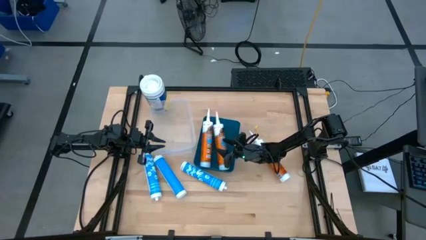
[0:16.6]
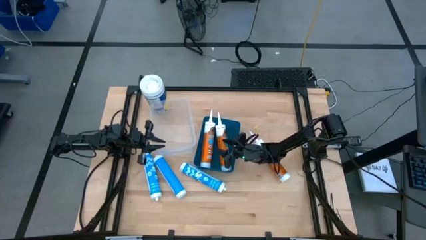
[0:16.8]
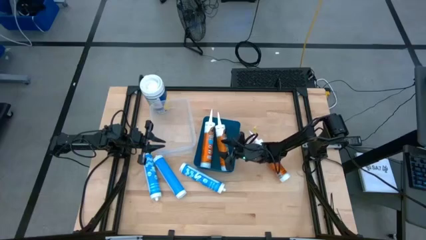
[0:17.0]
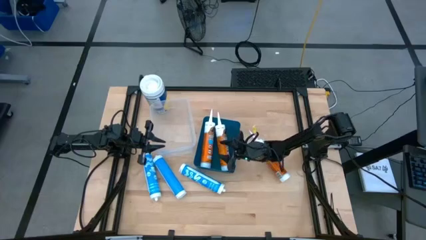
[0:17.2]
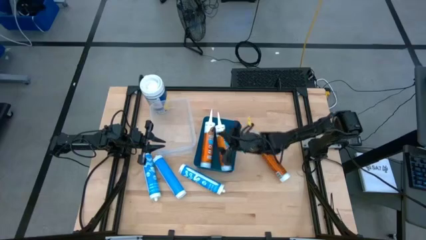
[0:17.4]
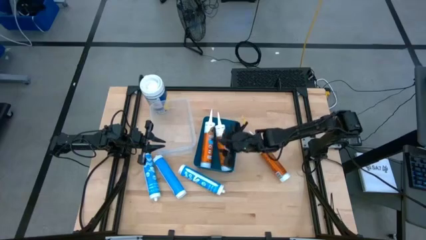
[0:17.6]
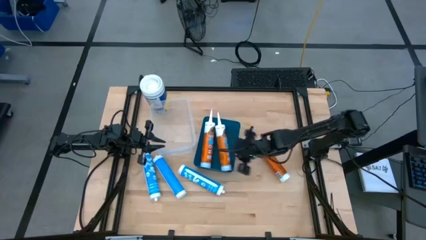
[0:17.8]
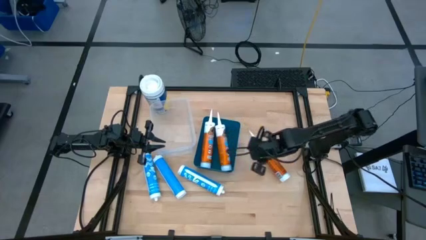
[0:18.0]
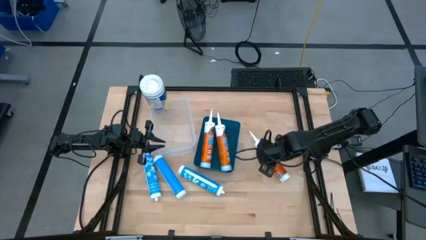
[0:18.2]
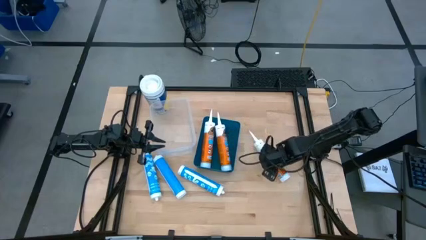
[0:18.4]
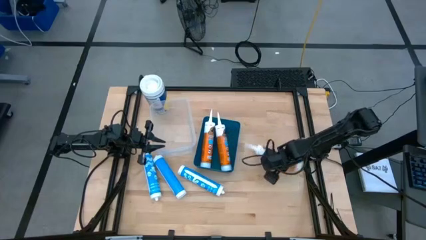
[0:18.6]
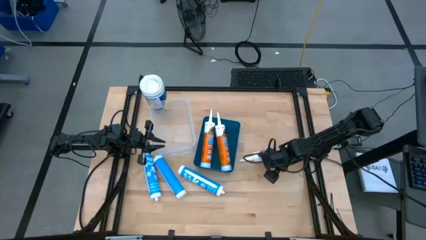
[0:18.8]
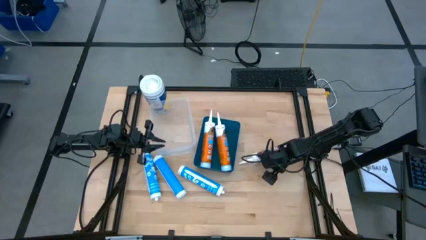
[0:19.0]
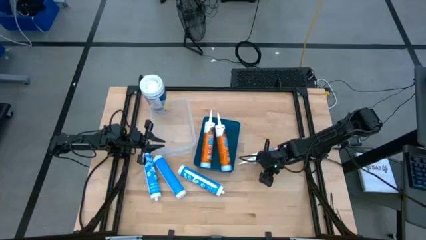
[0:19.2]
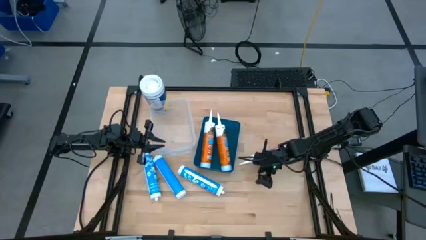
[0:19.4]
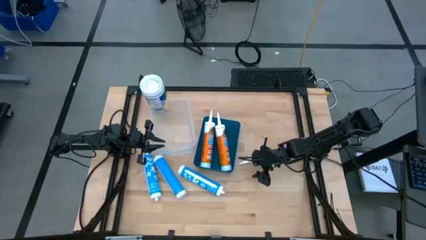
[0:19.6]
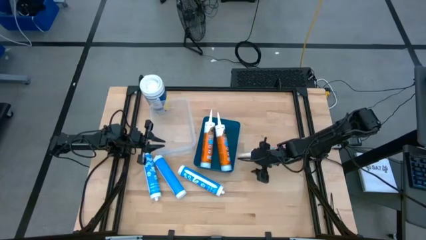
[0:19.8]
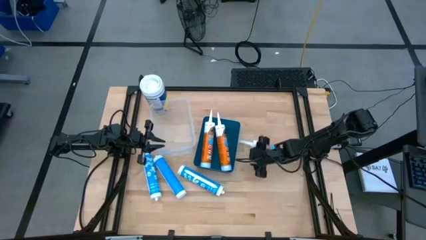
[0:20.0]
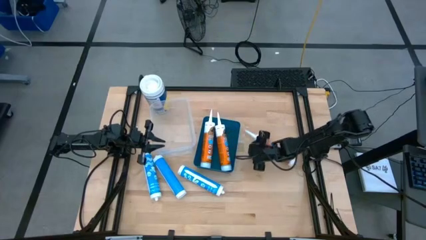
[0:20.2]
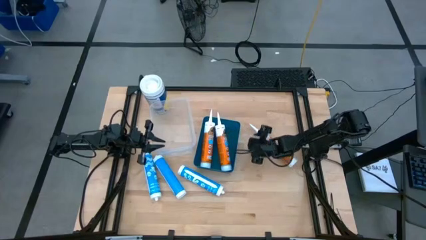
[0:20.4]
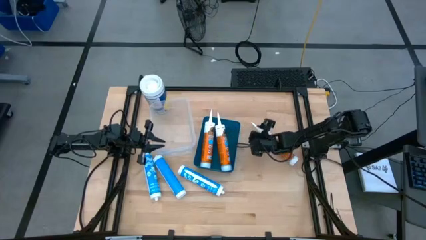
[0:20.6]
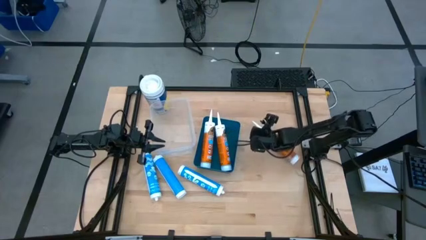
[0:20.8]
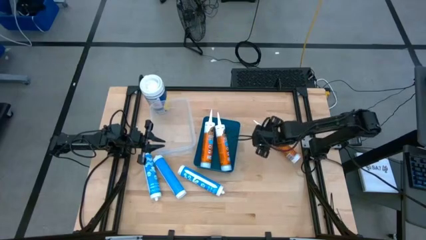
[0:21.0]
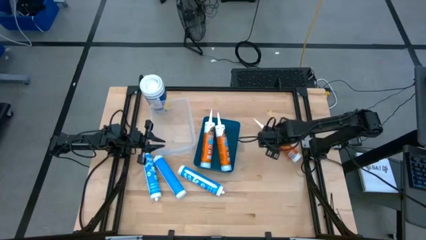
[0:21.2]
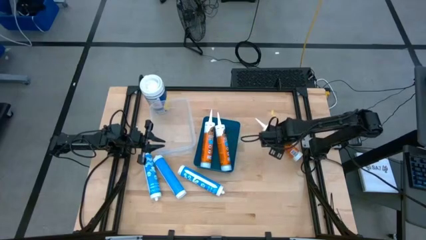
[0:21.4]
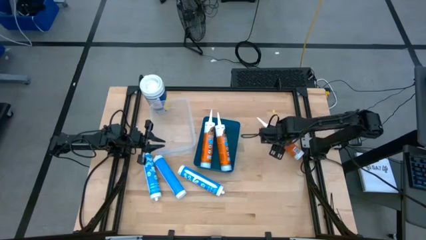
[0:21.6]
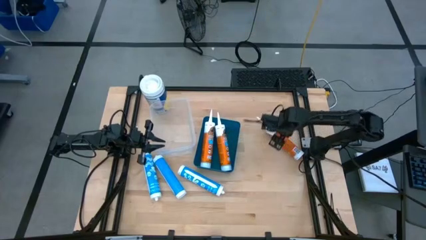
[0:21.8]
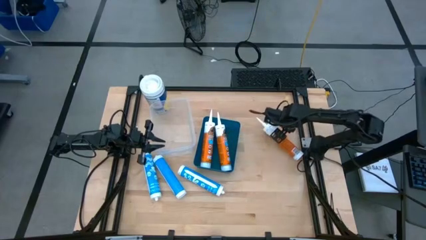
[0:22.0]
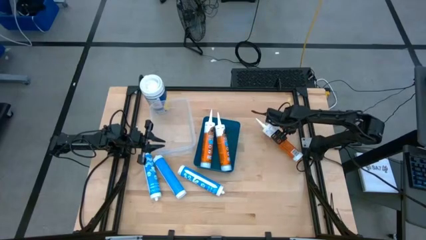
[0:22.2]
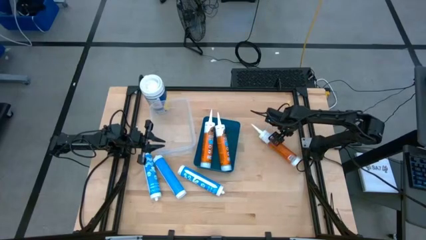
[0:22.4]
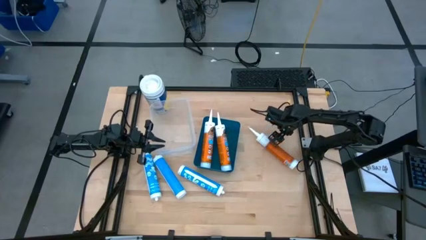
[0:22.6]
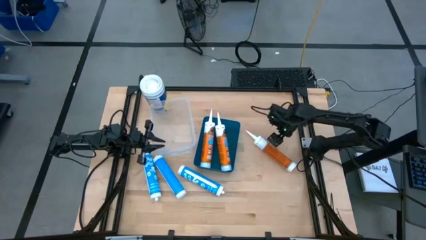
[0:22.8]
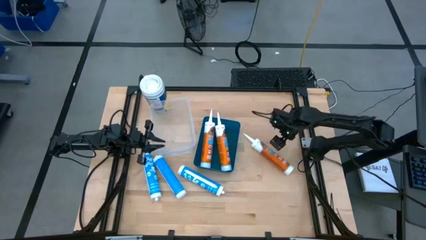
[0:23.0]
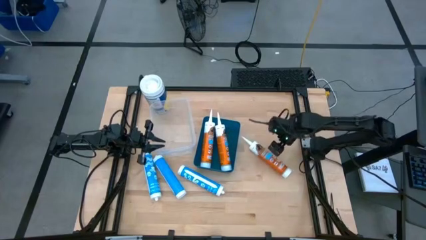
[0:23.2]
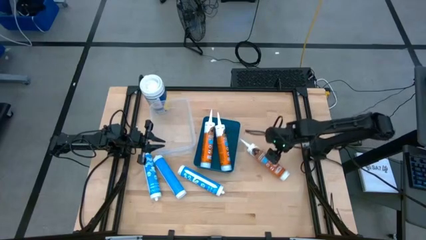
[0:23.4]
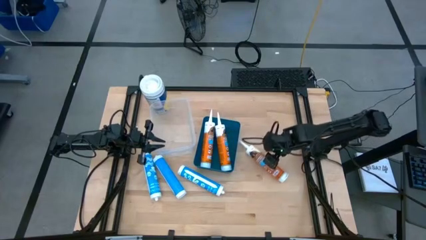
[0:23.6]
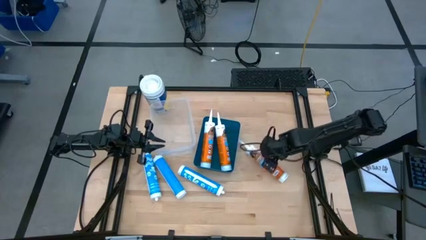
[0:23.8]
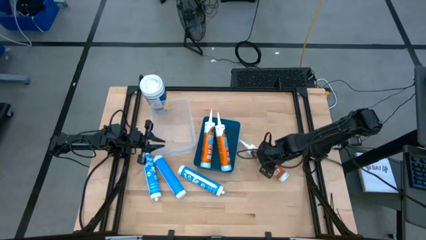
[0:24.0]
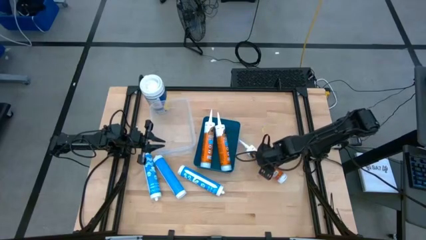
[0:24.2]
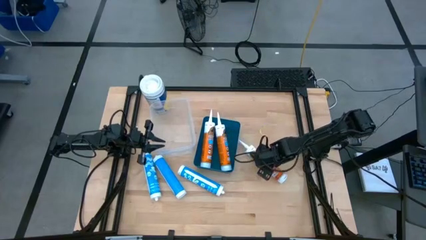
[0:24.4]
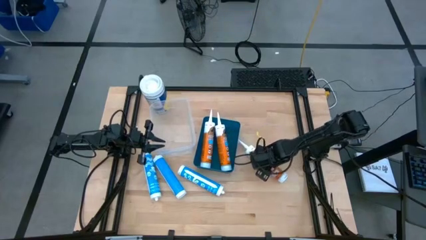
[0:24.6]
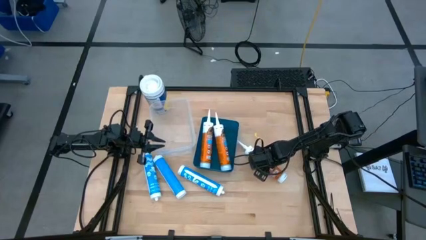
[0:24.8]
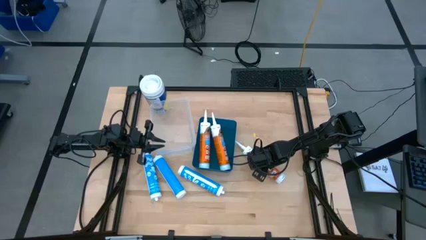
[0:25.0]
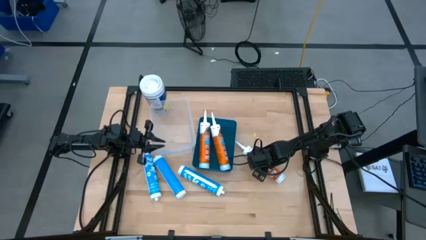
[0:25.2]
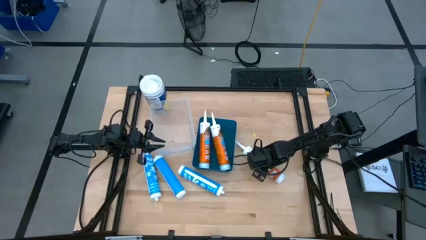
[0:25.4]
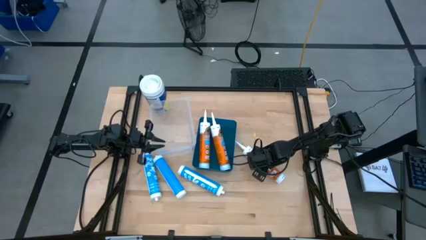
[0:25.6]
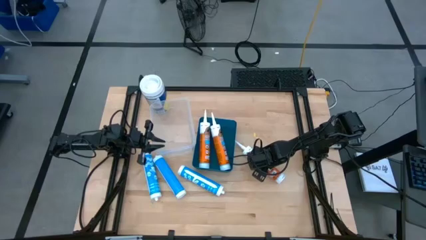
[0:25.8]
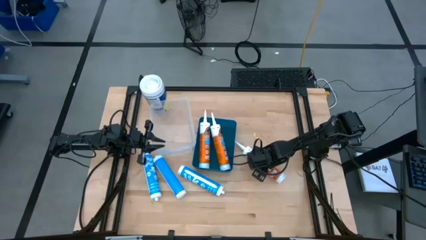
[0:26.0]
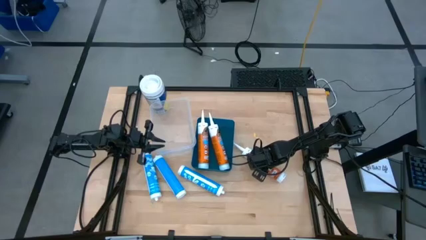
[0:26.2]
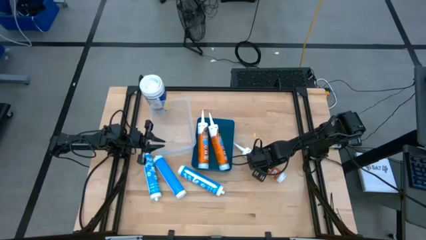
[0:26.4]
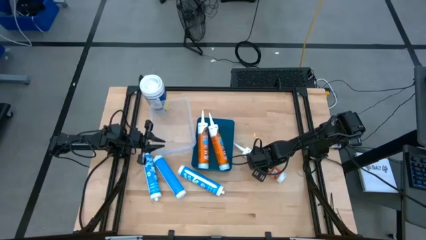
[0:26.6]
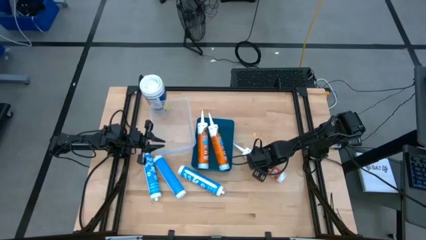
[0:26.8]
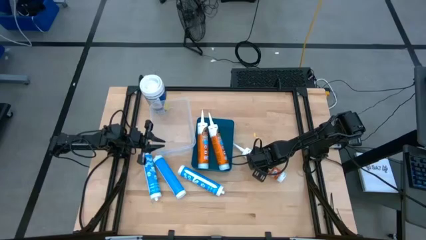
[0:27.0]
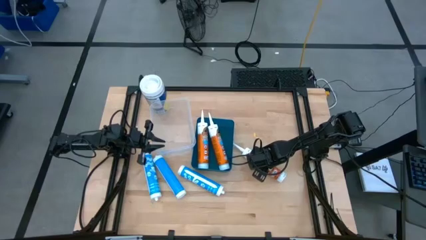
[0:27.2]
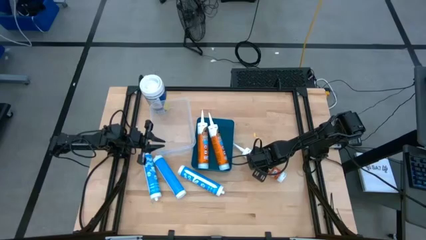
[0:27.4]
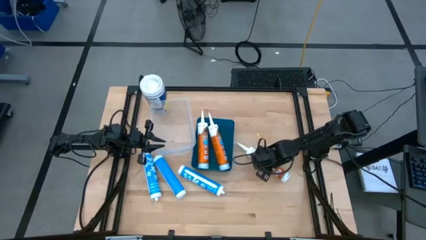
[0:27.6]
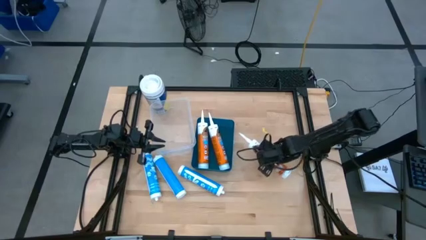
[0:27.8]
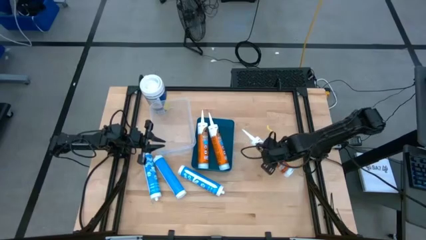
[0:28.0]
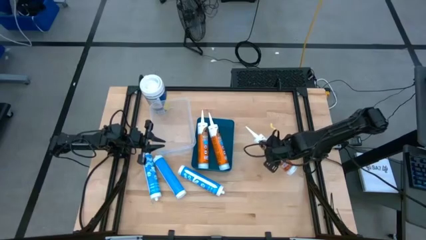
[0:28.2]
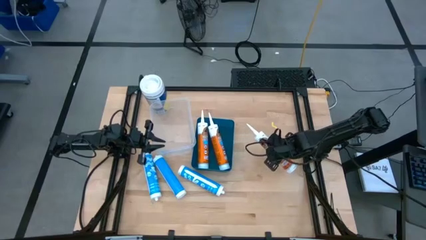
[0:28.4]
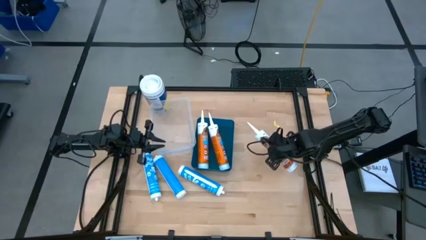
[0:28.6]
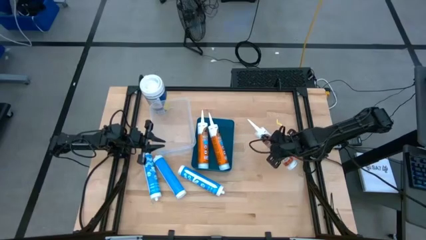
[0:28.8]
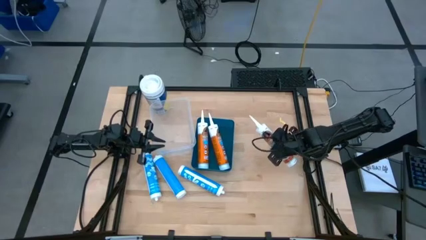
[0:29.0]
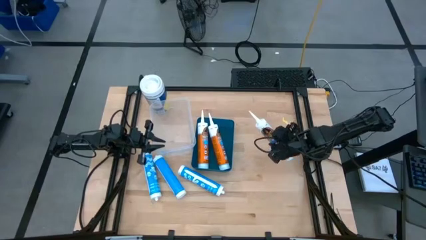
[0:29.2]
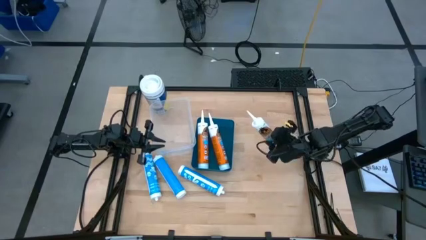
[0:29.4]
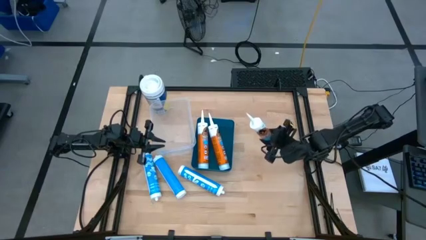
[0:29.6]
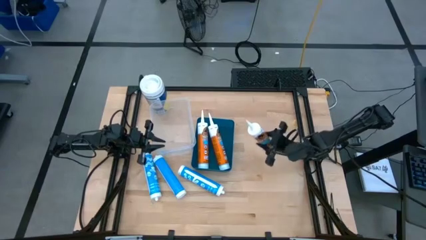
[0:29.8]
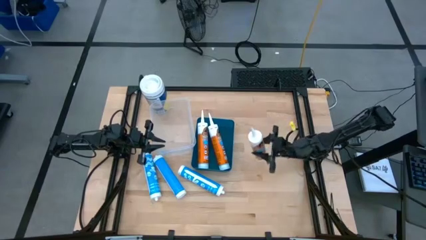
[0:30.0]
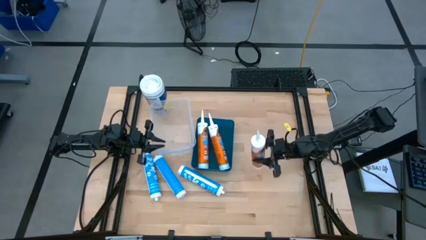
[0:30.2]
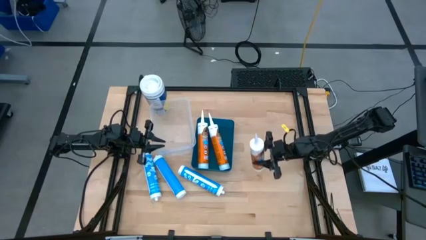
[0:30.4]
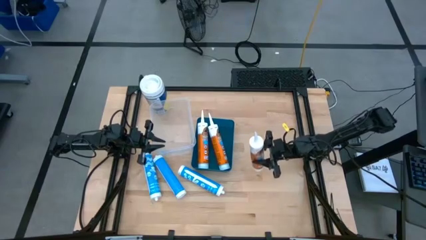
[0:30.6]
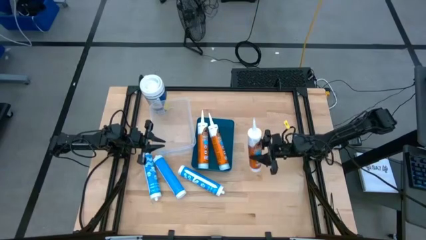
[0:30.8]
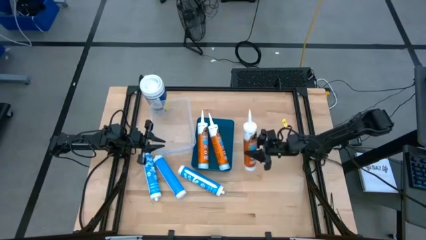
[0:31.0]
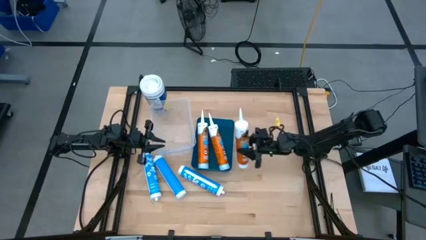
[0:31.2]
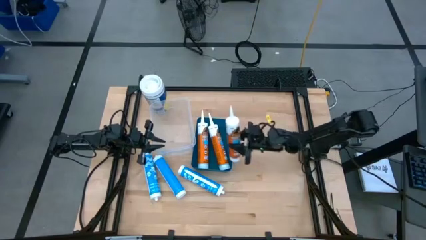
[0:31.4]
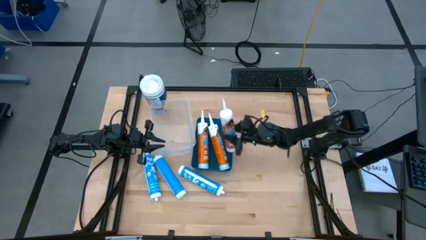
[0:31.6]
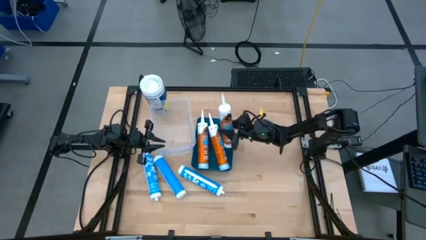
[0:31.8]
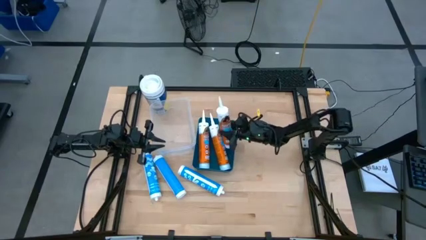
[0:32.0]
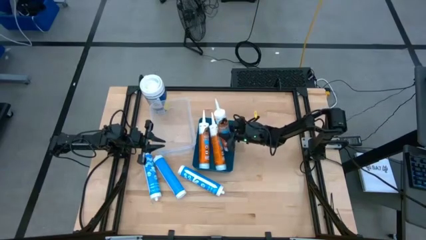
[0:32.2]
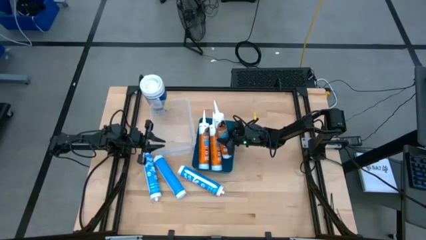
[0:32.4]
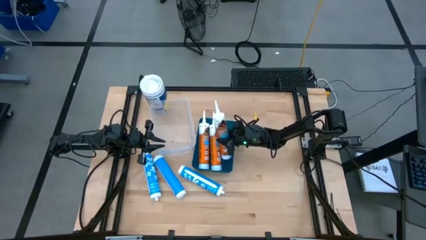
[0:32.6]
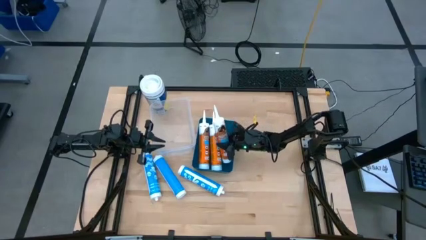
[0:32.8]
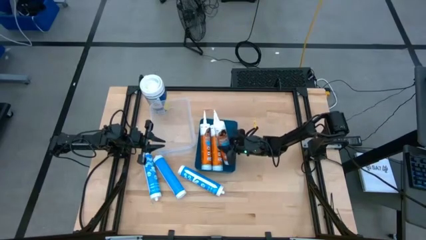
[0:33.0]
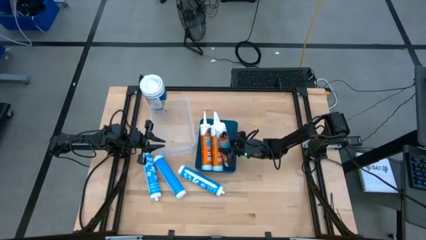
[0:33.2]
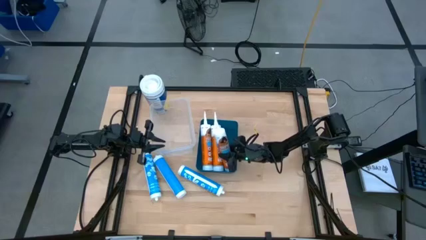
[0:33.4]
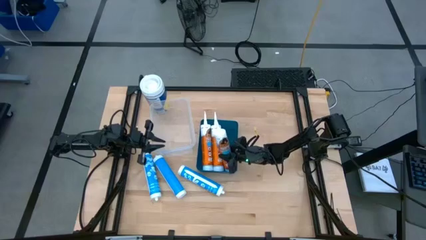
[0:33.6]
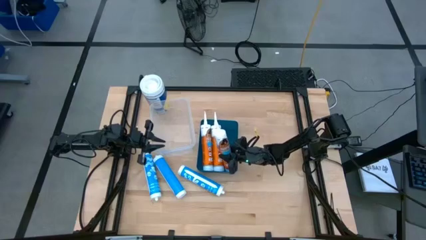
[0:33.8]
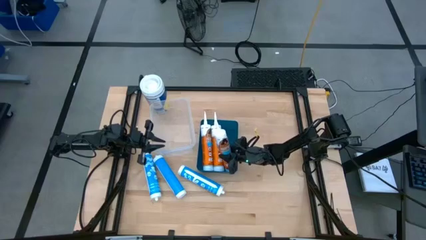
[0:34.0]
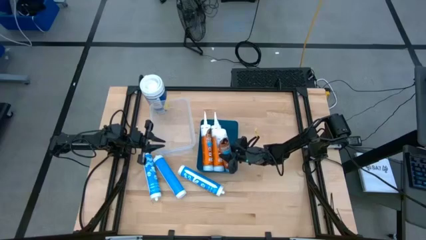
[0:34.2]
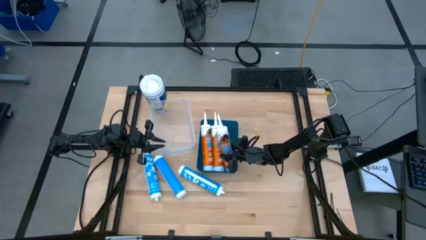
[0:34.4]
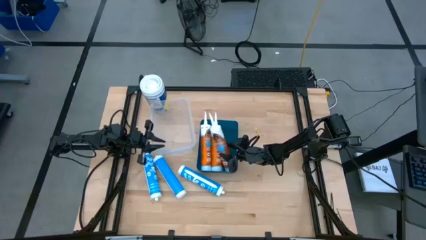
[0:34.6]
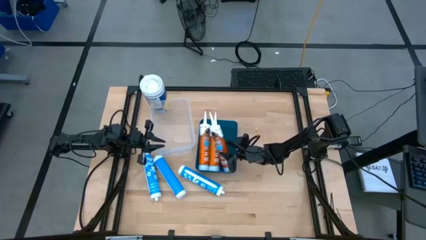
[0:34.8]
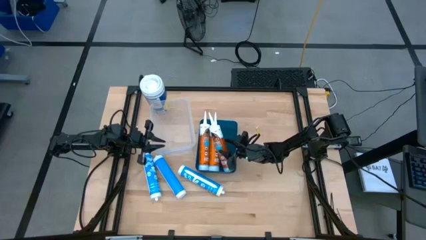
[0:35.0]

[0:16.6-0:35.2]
Task: Pick & place silicon tubes, Sealant and Lysol wipes
Put the orange sealant into the blue bin
